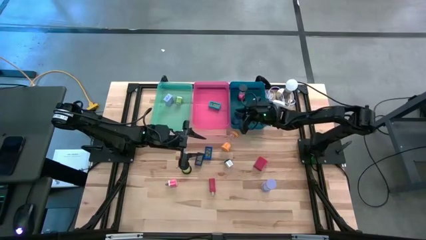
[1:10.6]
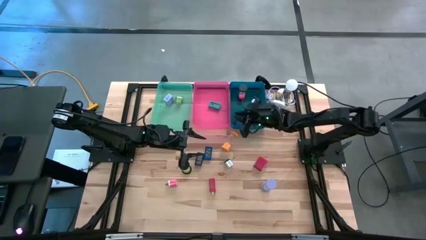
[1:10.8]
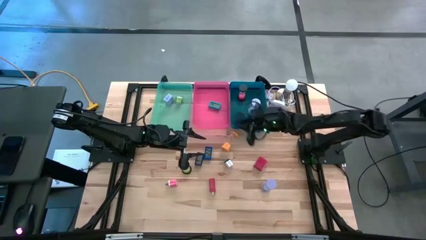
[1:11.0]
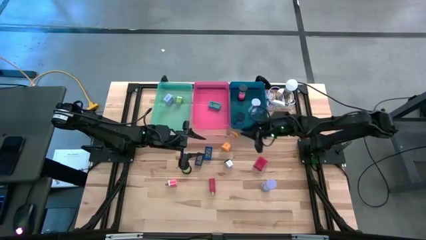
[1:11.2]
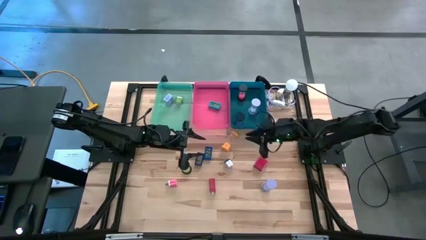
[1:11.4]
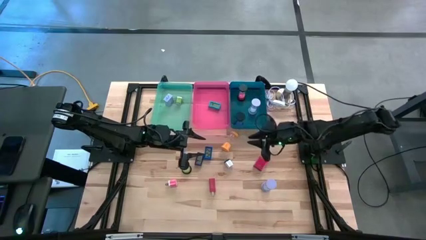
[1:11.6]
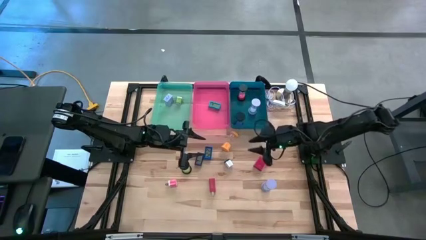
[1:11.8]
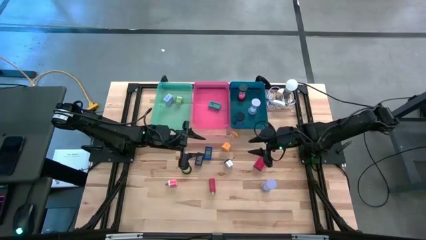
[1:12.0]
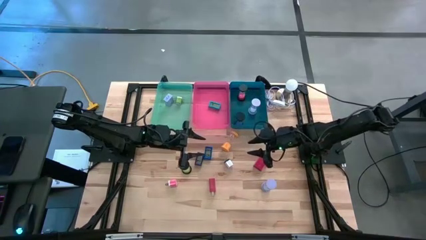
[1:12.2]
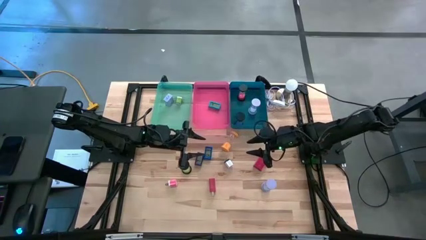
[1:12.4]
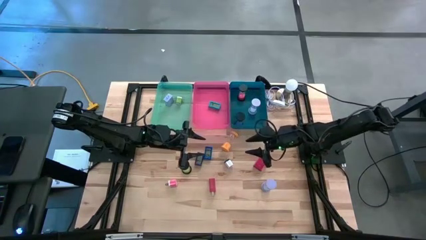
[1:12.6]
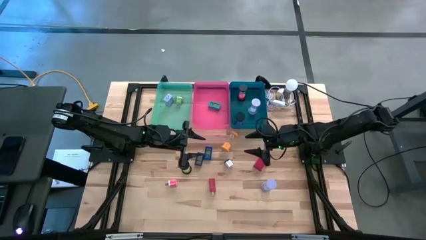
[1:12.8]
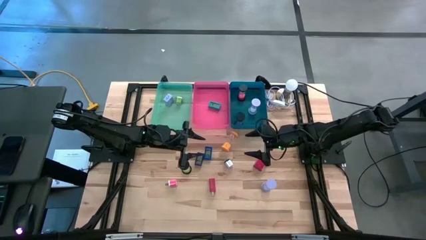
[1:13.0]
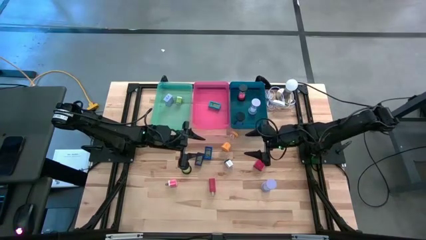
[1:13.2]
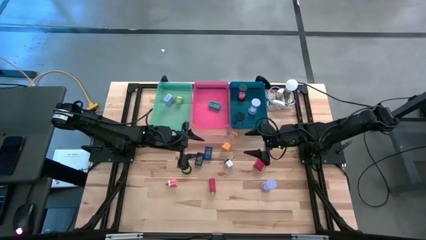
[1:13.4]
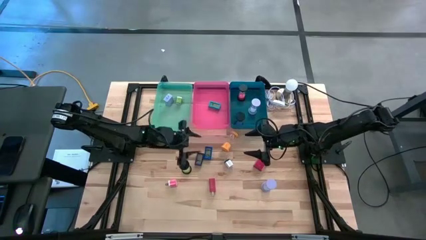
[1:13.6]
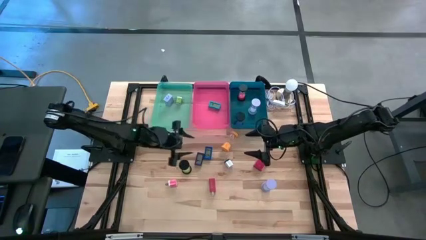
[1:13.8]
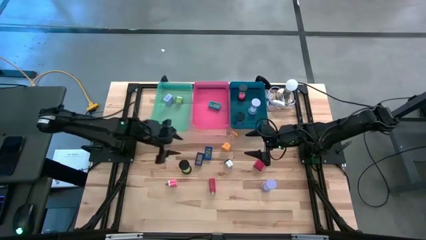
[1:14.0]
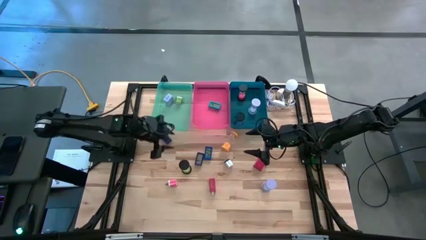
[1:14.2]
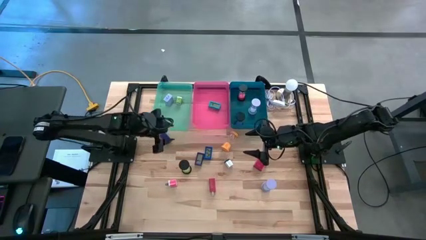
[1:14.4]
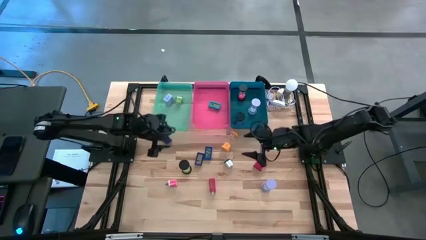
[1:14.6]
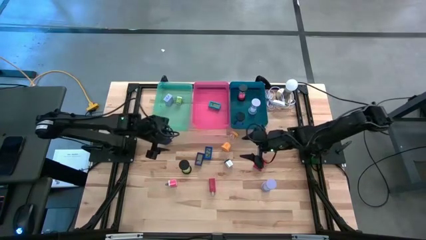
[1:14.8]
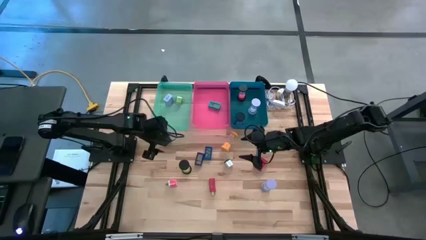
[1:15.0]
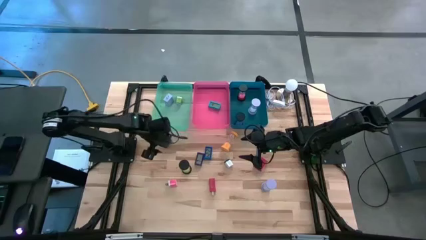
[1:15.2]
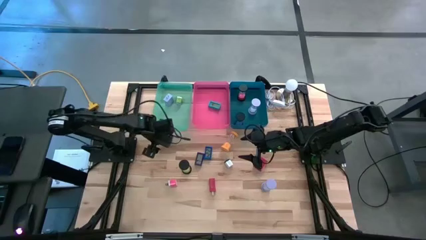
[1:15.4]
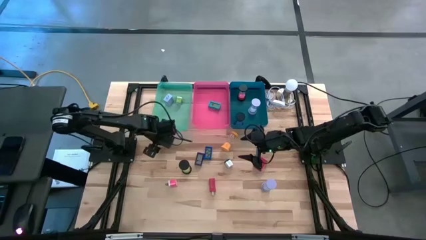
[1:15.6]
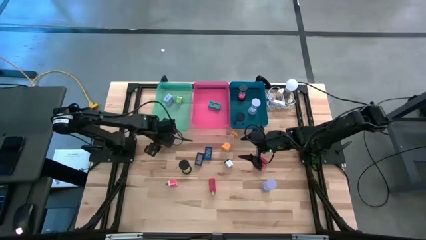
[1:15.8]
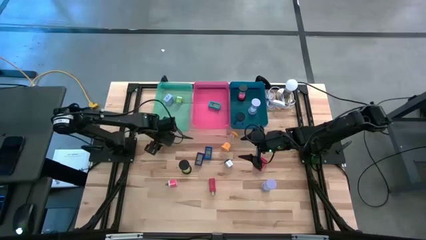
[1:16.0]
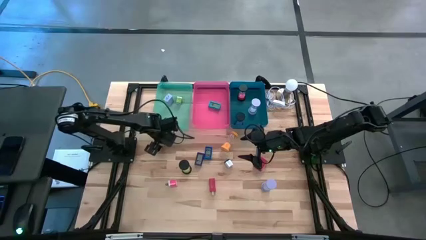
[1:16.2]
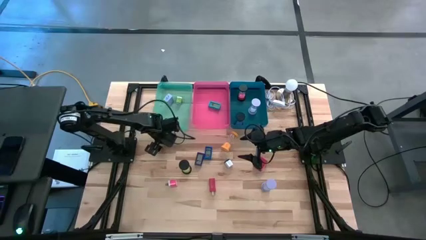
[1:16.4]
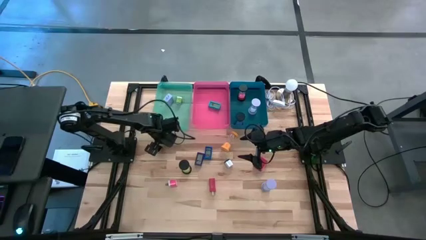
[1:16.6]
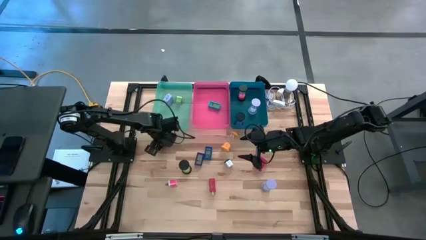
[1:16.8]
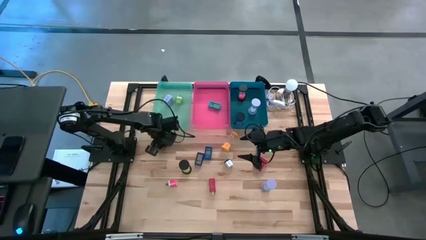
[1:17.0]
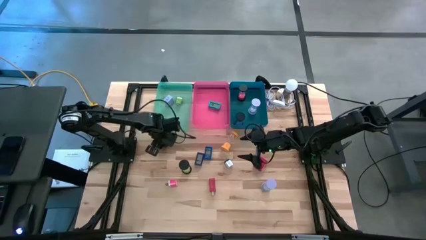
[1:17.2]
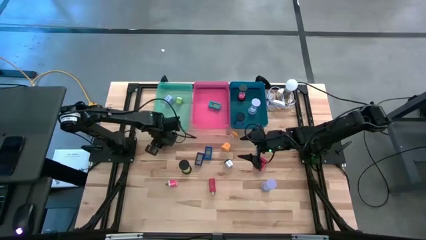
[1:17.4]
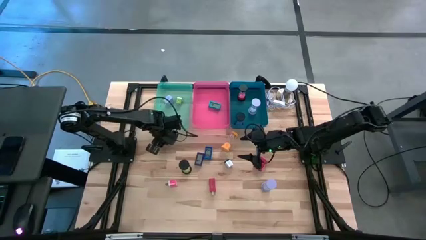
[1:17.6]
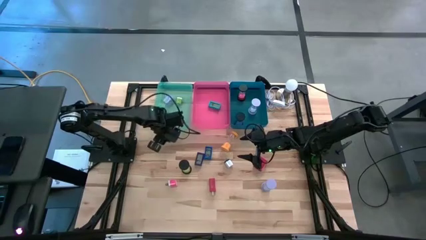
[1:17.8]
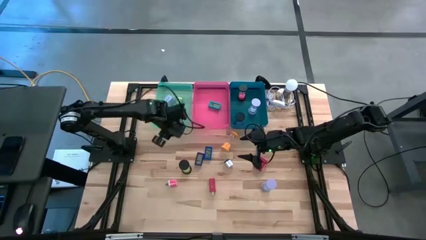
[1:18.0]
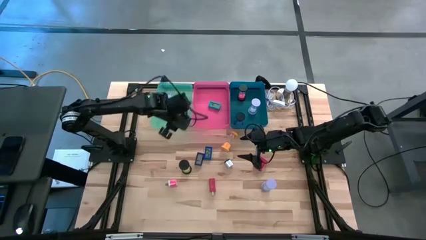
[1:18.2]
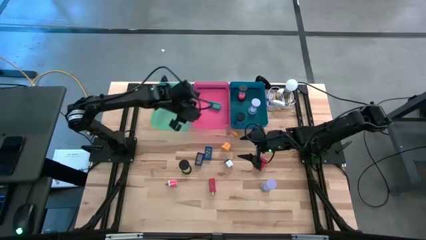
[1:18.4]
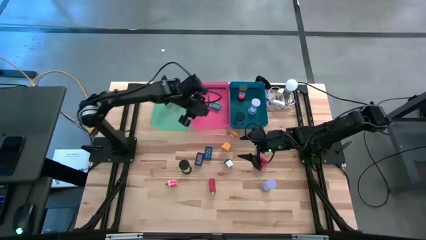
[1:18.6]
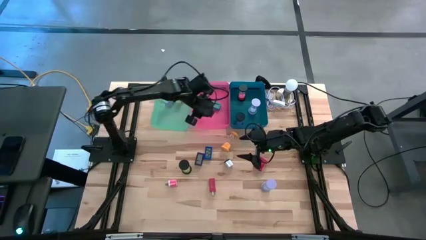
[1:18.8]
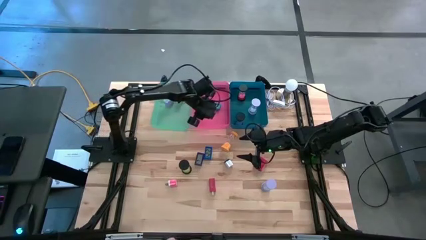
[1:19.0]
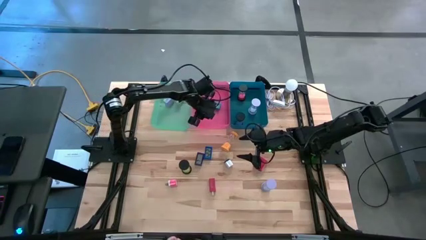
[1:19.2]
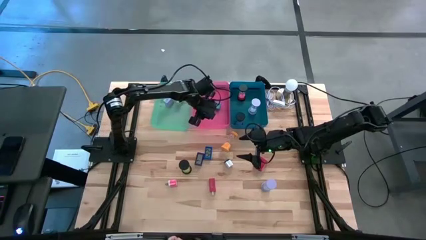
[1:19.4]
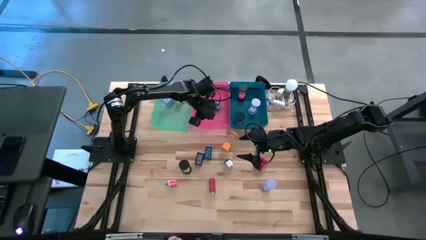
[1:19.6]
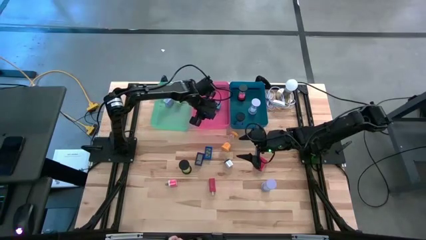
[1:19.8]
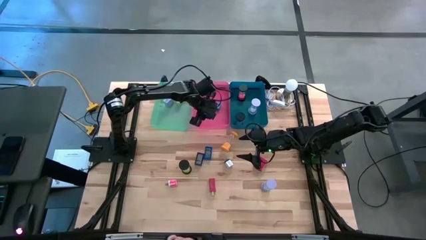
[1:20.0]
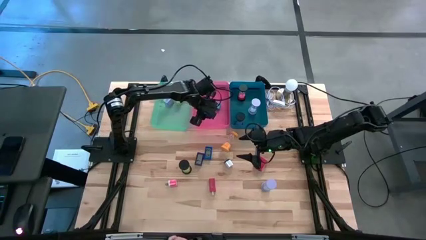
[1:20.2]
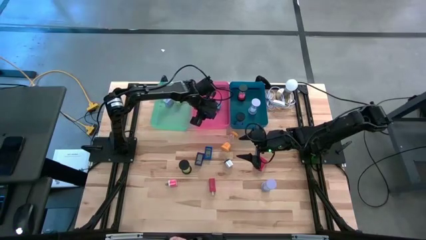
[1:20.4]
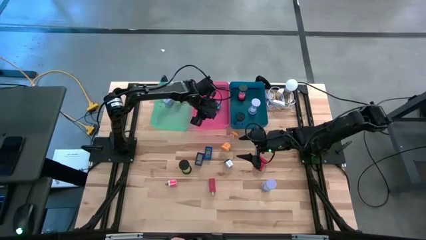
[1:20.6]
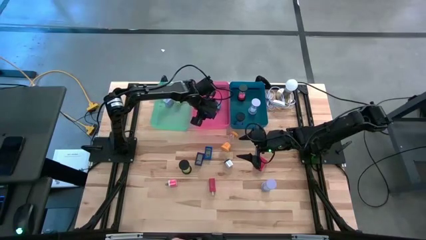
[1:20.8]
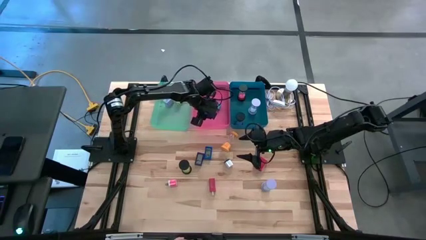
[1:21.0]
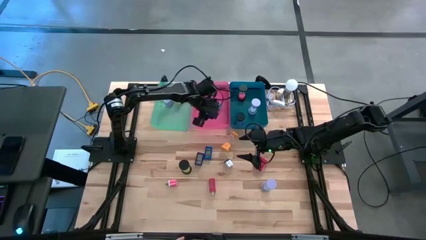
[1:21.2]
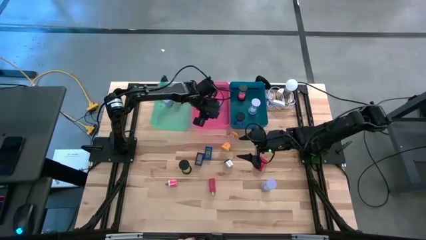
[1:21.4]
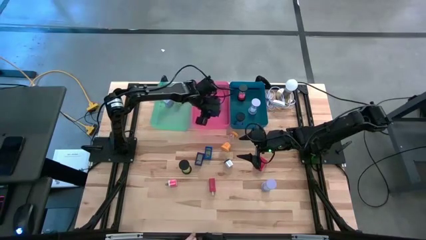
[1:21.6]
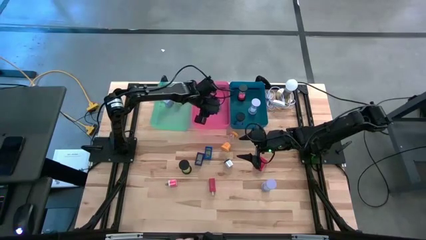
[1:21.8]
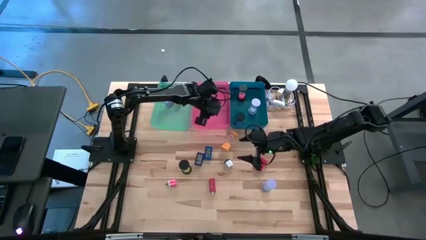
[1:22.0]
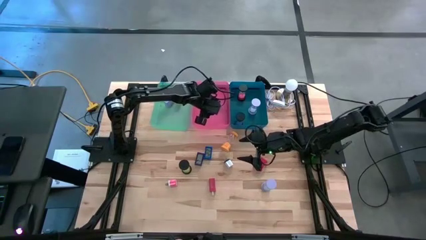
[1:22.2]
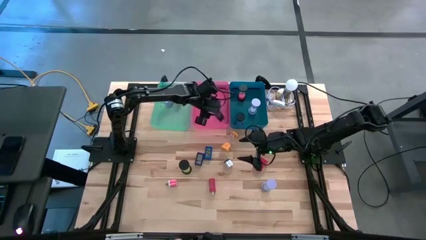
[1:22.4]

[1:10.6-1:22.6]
Task: Pick & Place Office items
Put the left dark blue digital clock into the pink bin

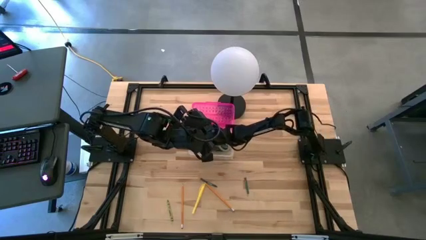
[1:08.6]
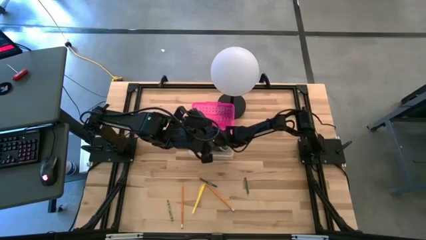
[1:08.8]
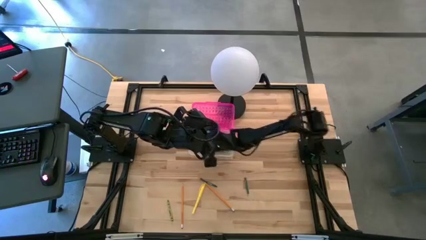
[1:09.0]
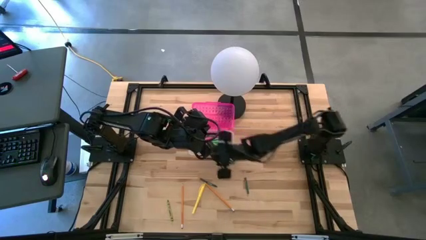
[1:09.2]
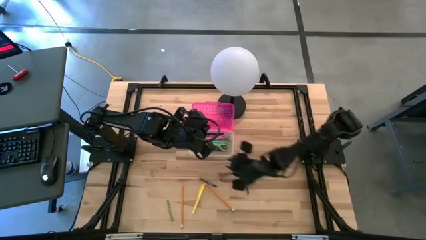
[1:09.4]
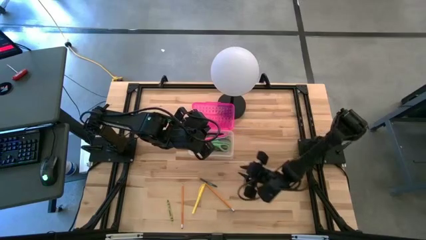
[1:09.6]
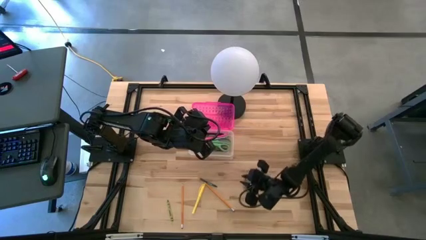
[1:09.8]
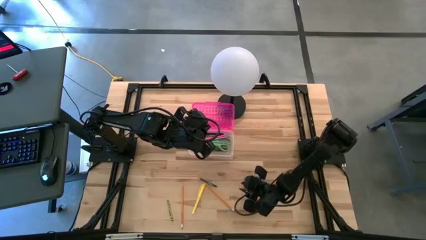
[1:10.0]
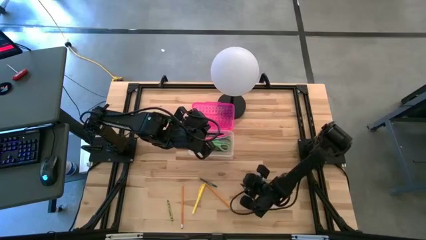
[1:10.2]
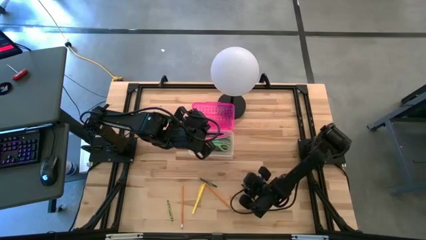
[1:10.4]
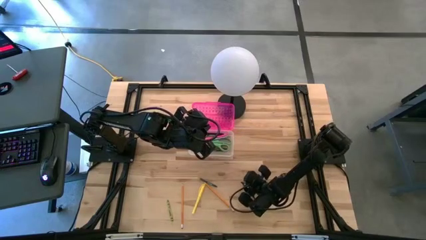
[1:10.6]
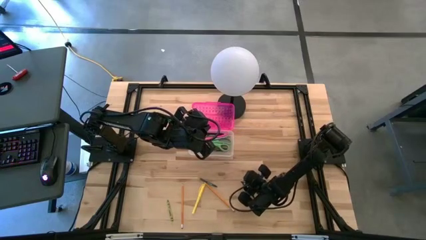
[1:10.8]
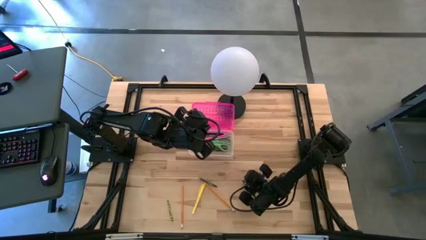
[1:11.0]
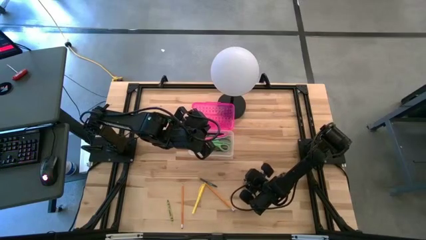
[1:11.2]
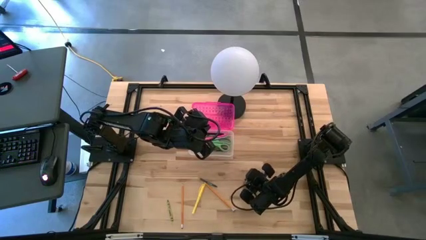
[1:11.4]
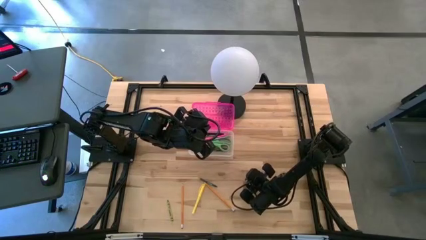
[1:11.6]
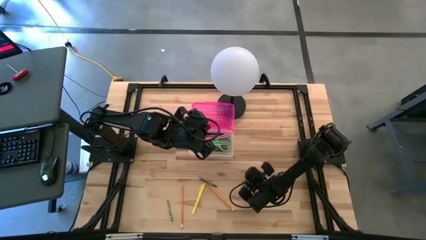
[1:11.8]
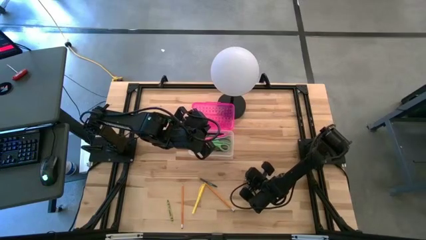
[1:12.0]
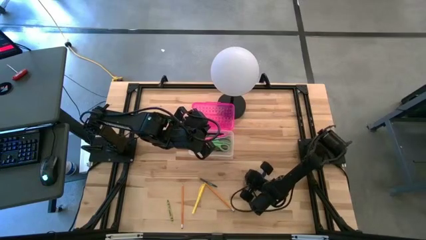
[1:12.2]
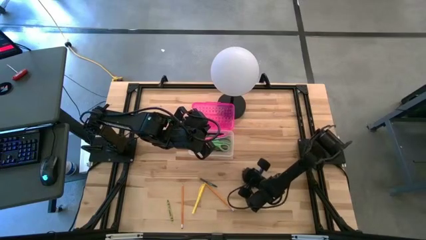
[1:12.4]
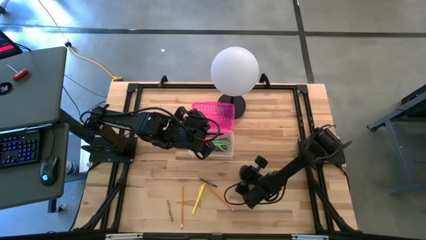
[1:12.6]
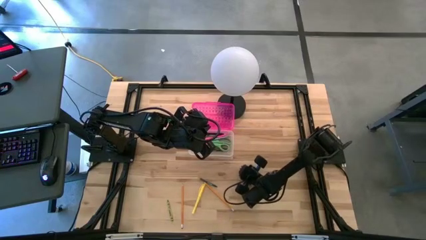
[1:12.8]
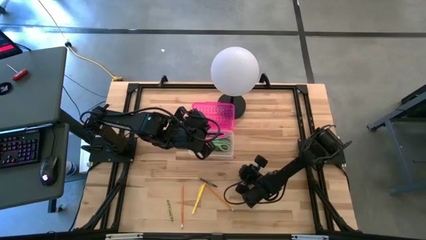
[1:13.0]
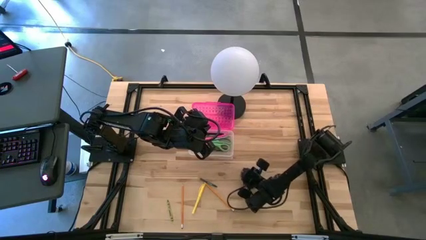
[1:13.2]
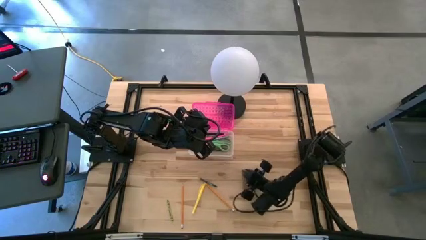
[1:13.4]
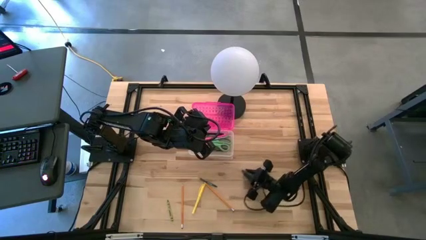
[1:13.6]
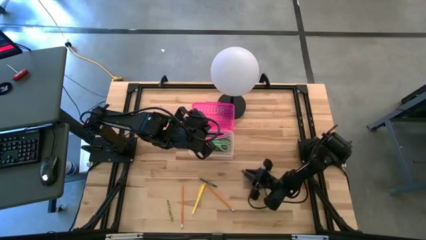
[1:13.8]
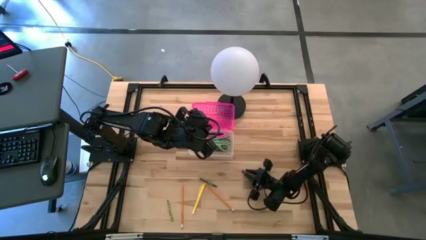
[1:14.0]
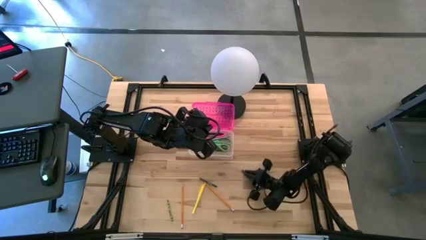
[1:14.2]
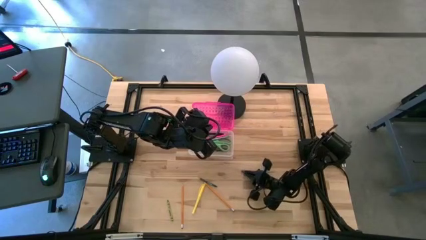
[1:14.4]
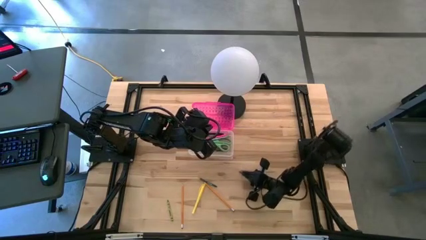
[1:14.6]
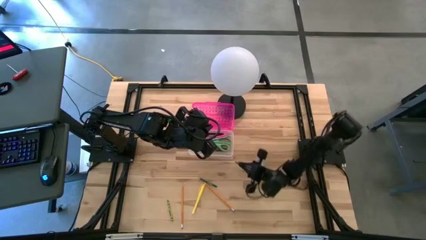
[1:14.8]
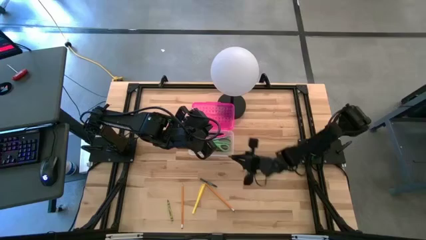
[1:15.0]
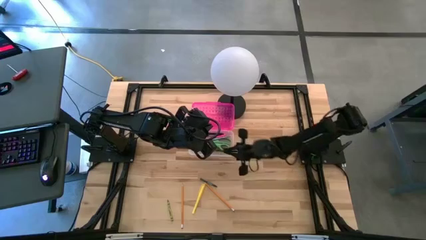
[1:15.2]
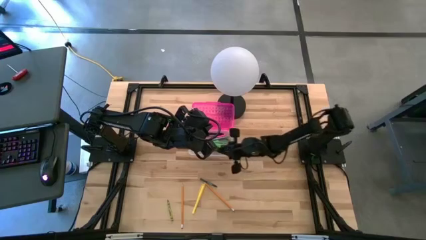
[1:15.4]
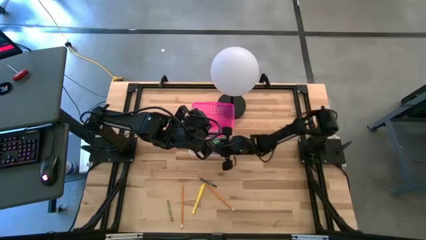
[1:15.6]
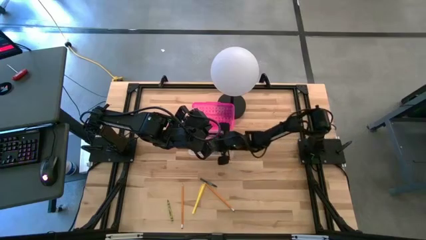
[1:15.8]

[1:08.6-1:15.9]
Task: Pick & place school supplies into a supply box
Put the right dark green crayon into the pink supply box
